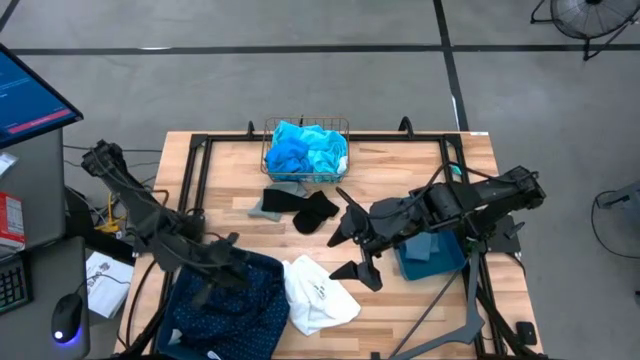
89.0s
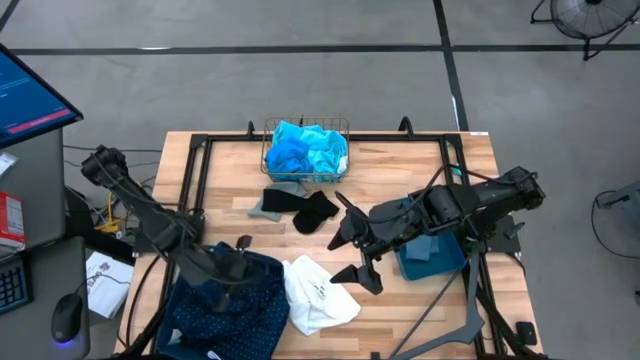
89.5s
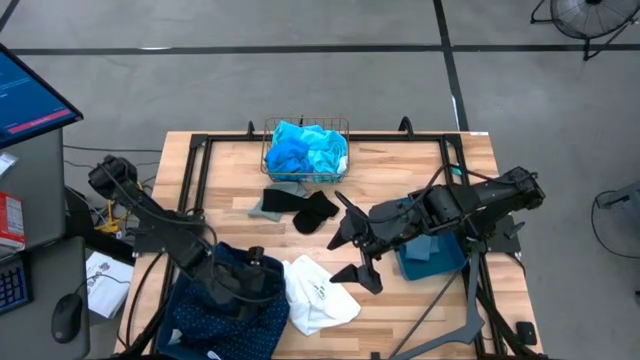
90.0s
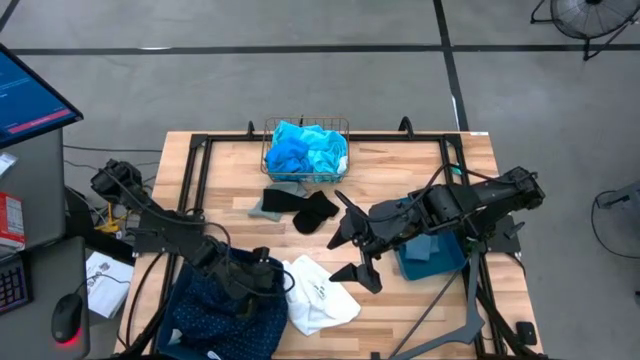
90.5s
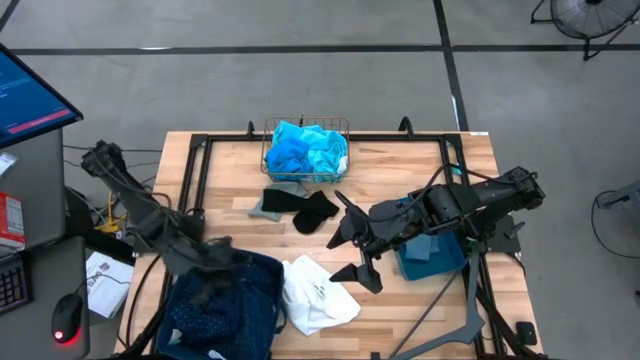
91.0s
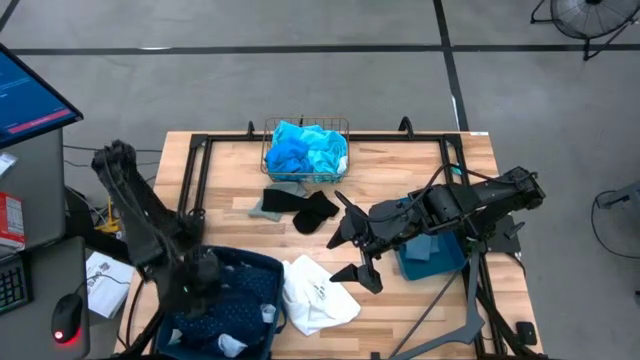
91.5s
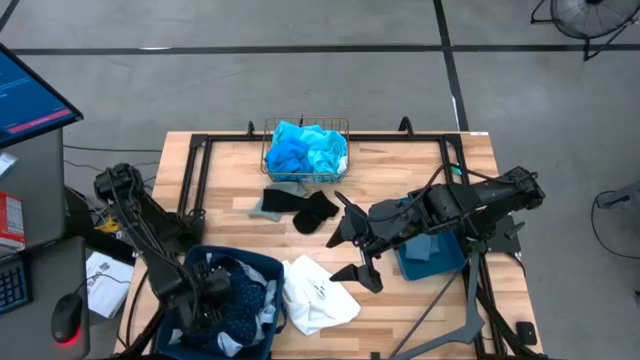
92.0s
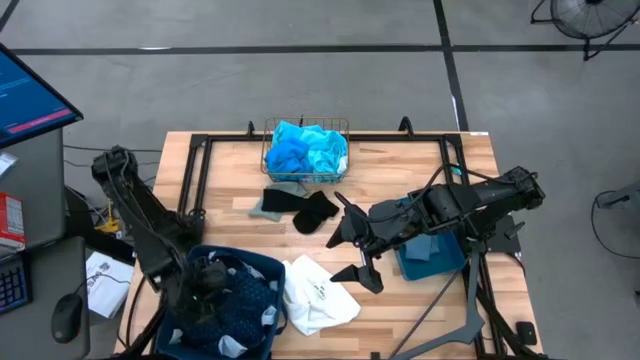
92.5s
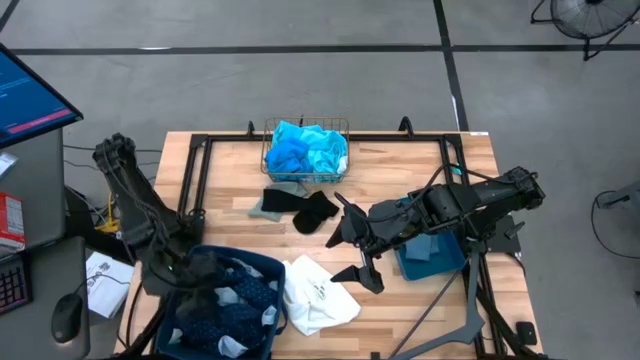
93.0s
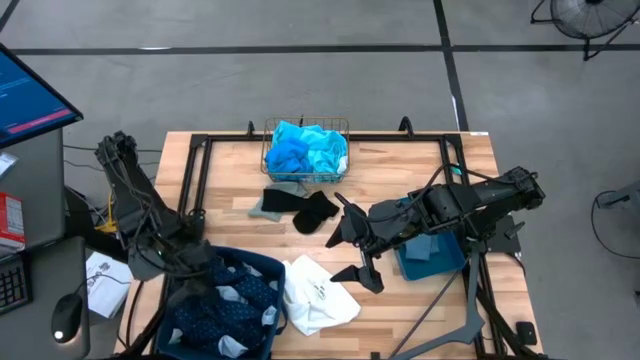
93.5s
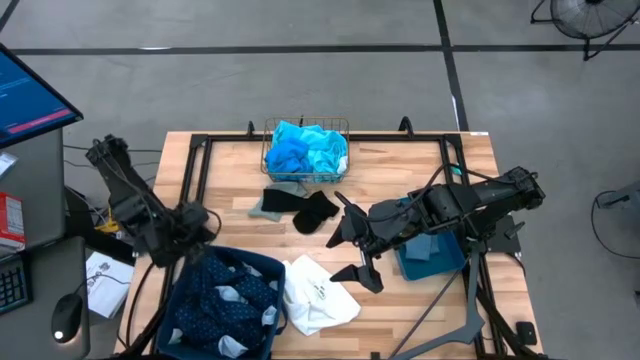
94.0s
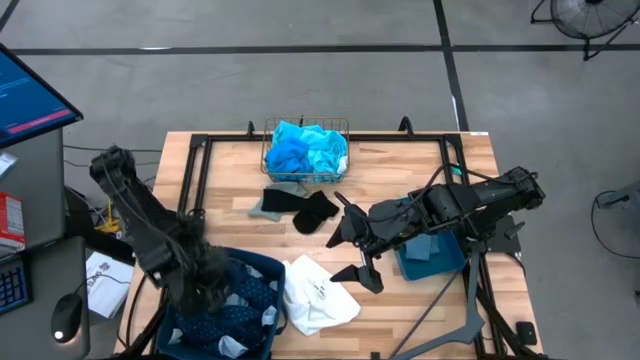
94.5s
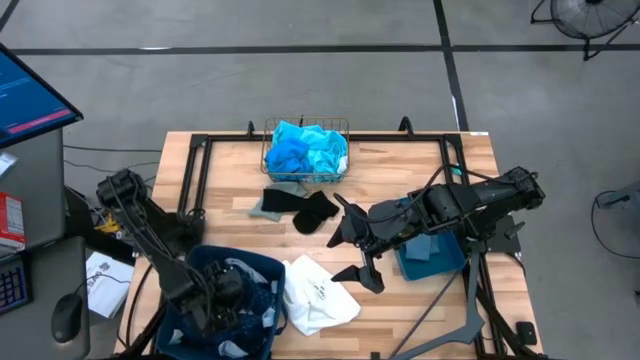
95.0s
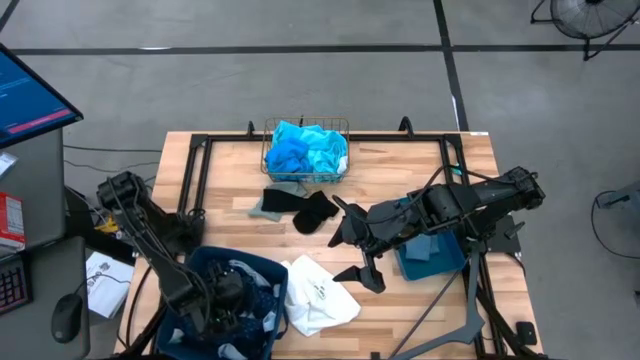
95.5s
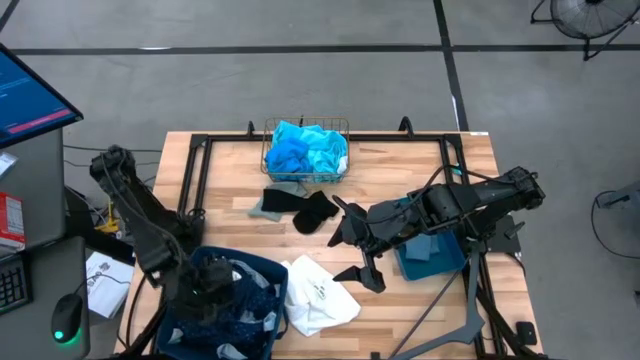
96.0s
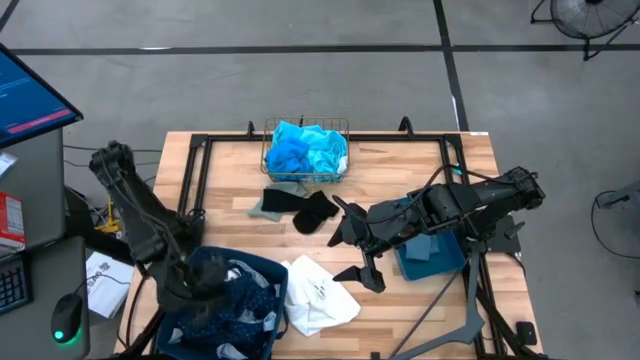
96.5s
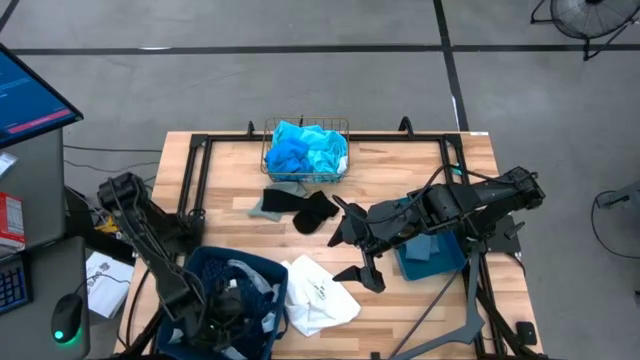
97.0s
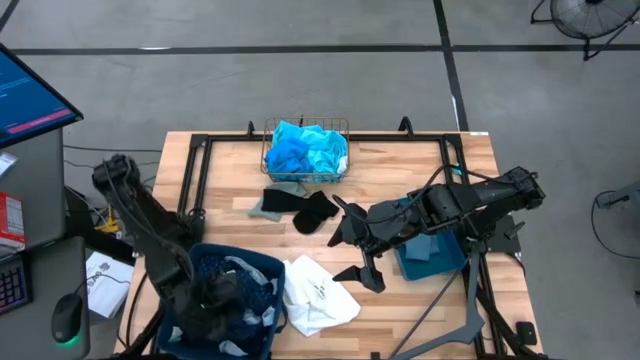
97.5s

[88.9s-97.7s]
Task: Pick & Place Cloths
Put the blue patterned shirt into the blue laundry organizer

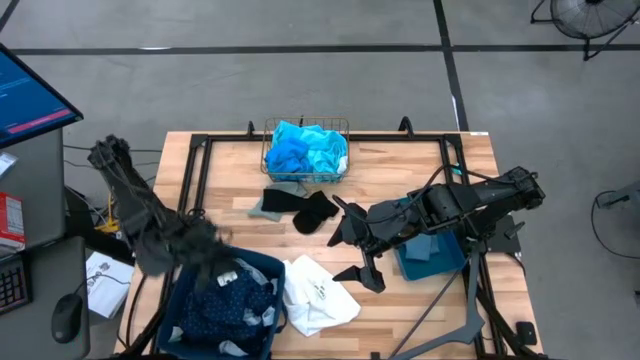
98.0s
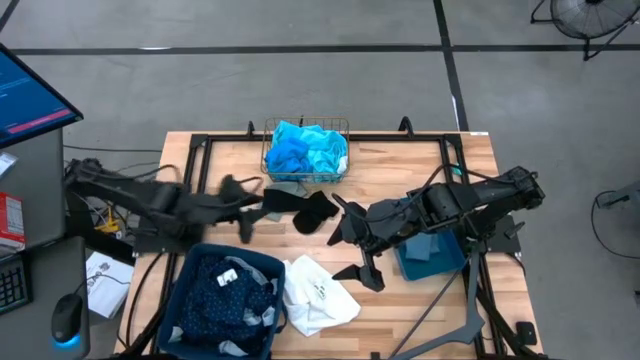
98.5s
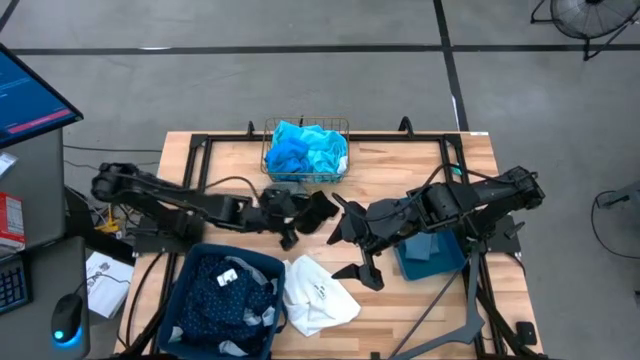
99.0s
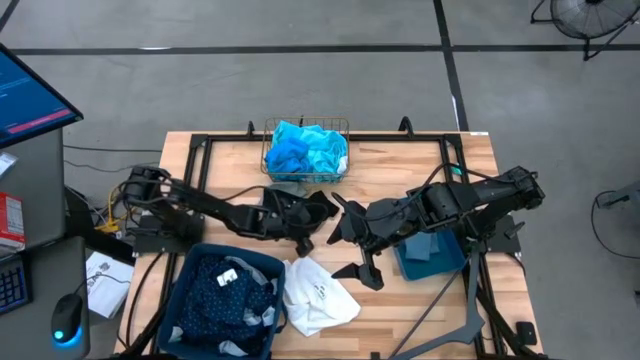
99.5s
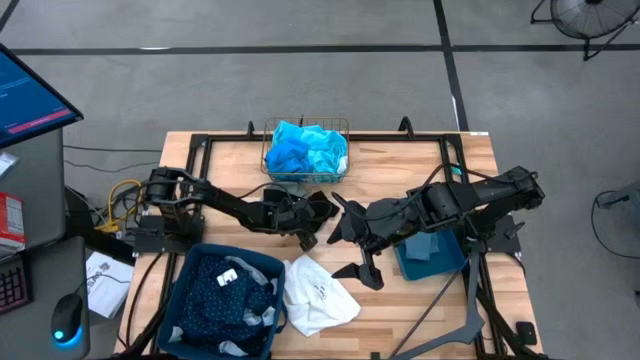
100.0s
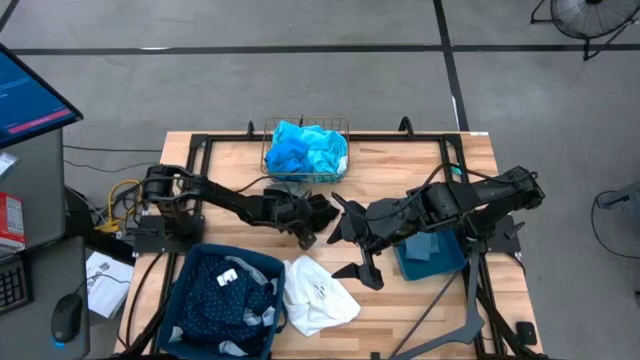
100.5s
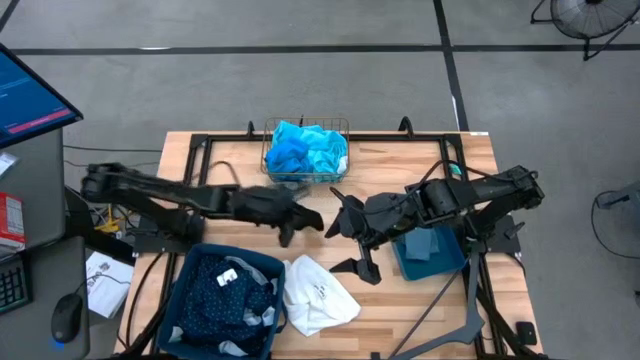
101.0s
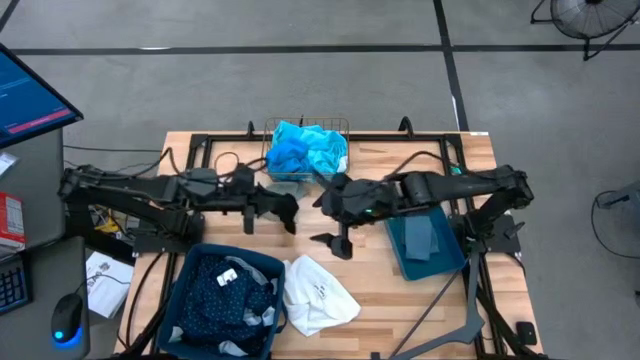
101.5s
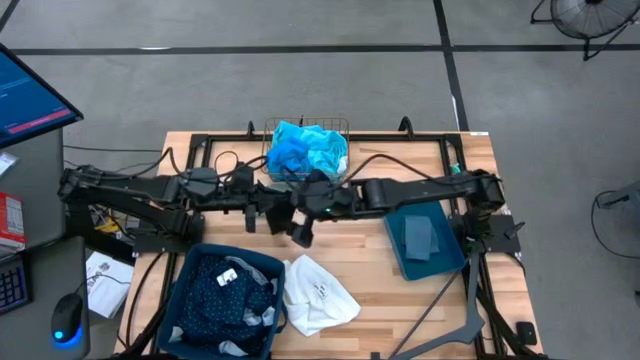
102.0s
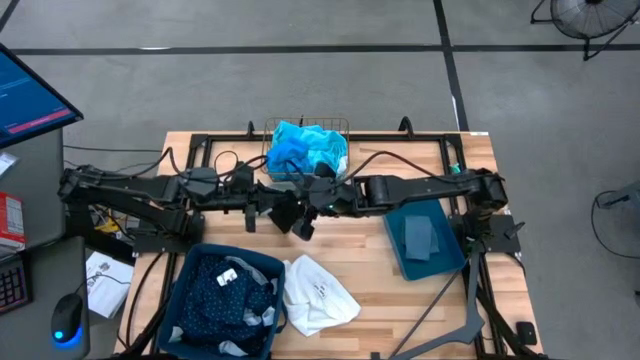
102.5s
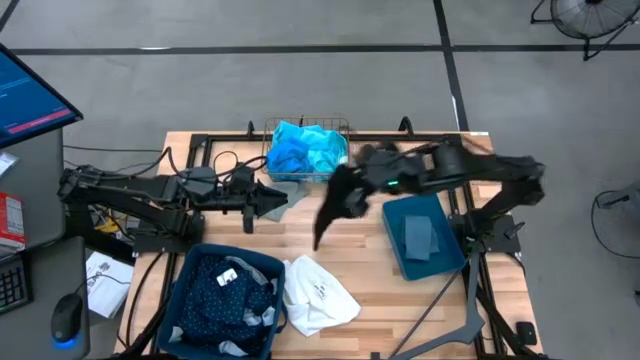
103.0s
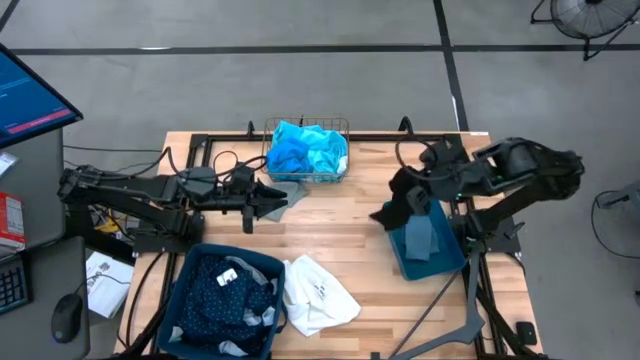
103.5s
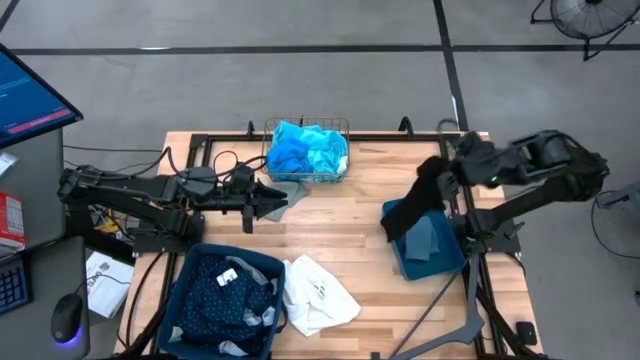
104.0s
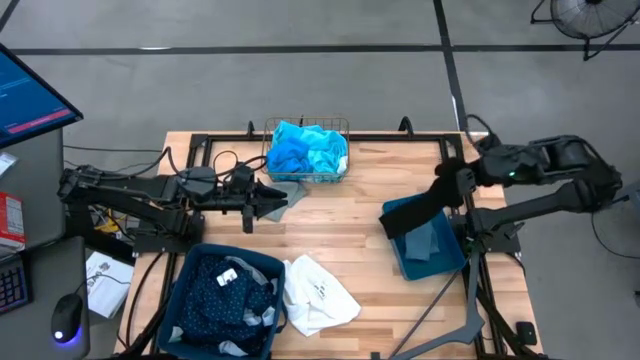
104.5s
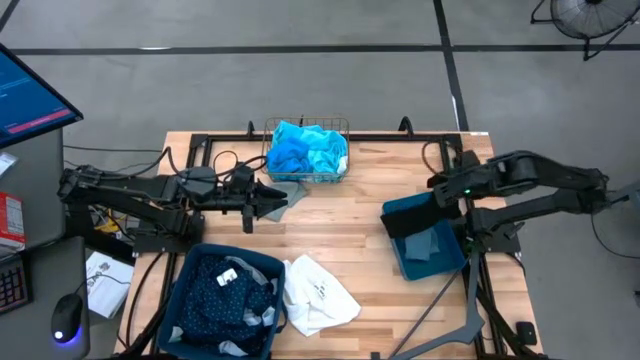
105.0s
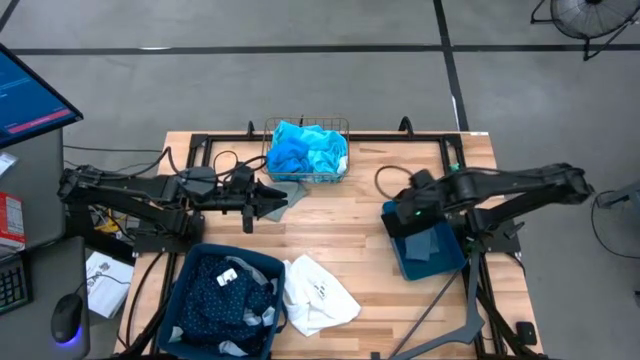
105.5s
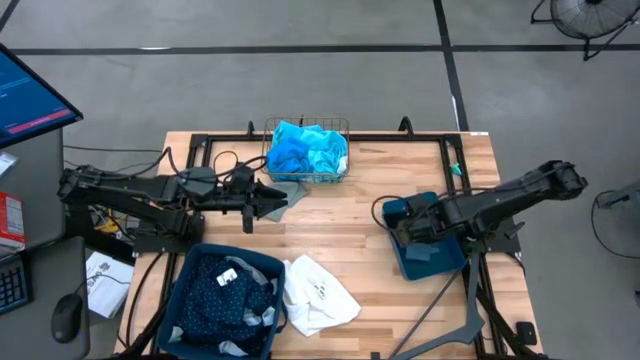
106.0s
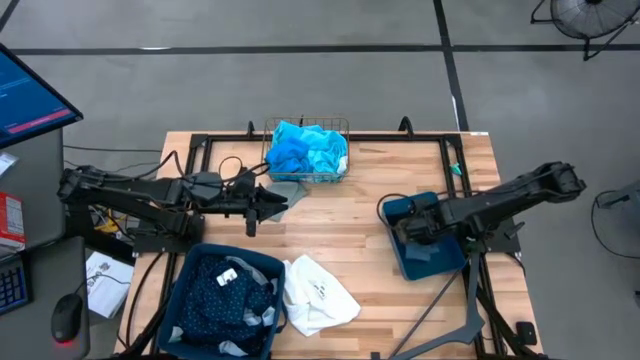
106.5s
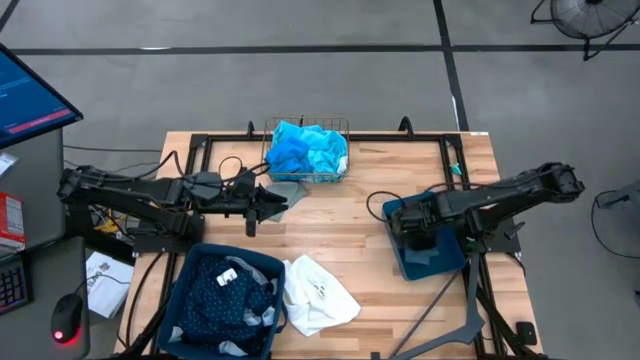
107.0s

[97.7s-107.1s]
Put the black sock into the blue bin

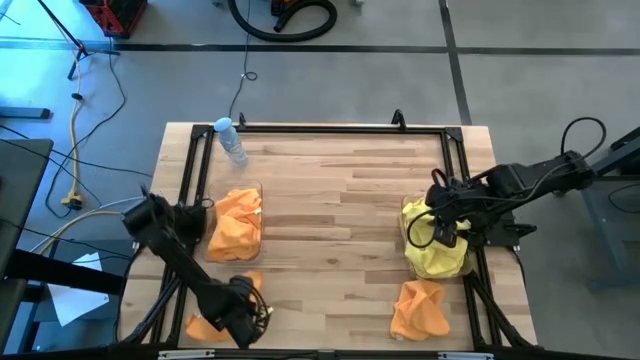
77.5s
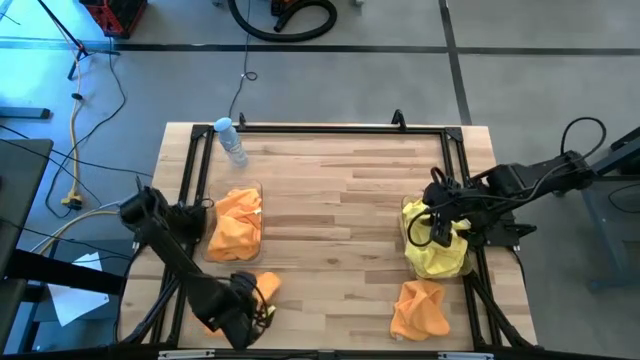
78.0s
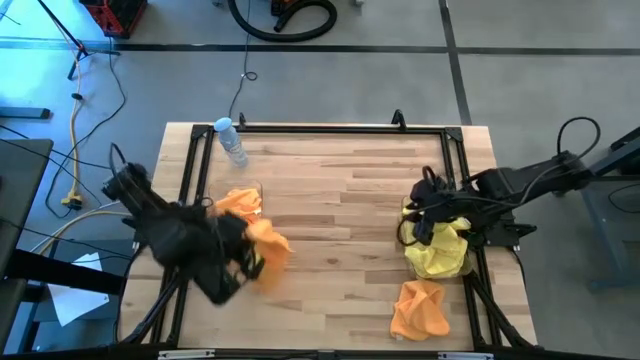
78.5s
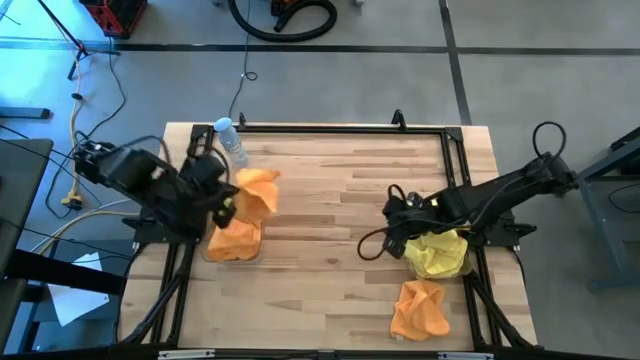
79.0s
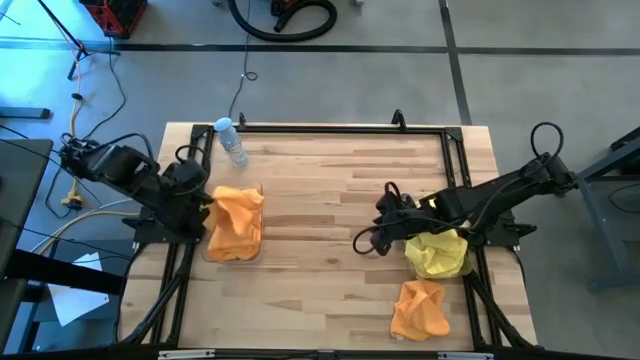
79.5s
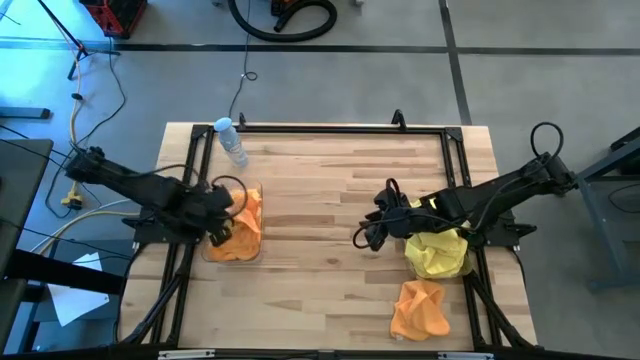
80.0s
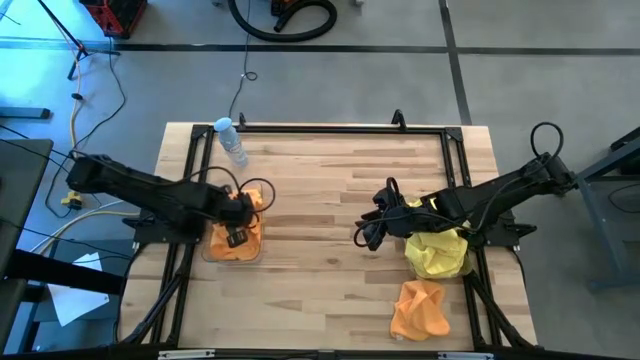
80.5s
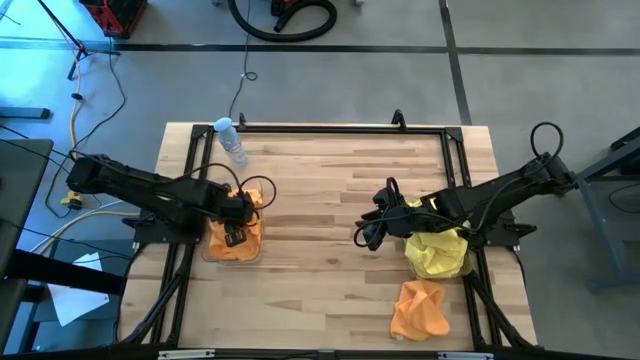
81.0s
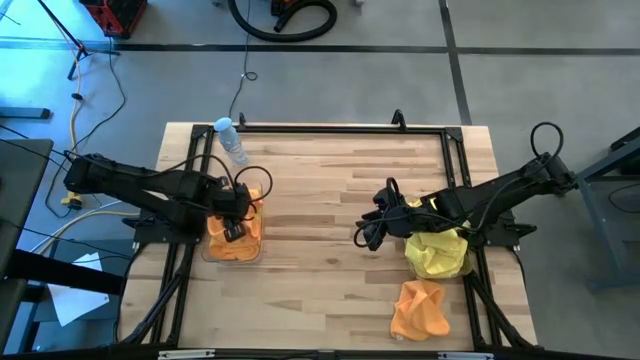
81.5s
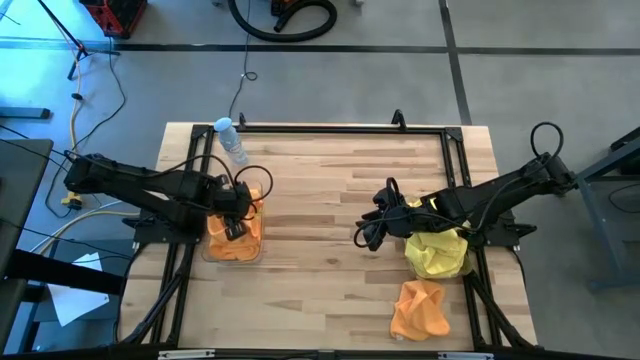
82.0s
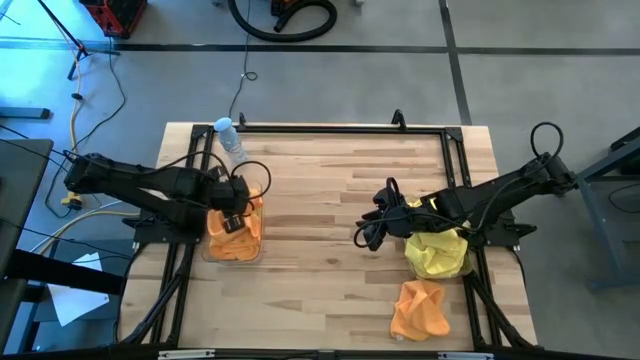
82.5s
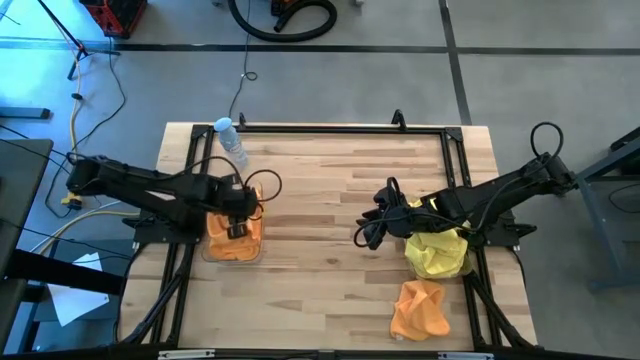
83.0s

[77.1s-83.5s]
Task: Sort microfiber towel by color & place in baskets
Put the orange towel into the left transparent bin
